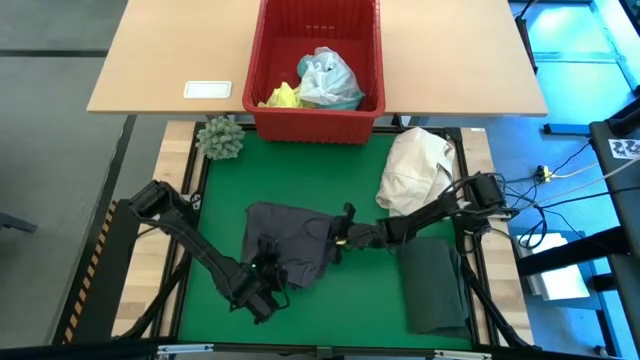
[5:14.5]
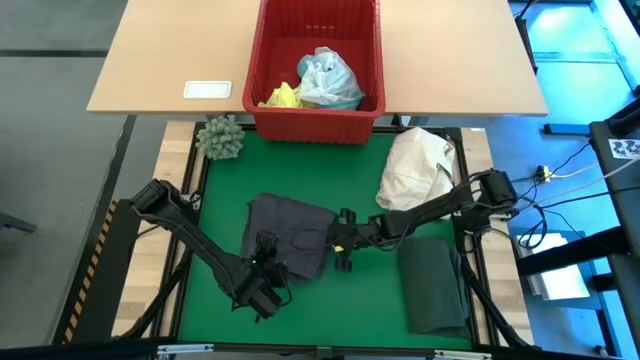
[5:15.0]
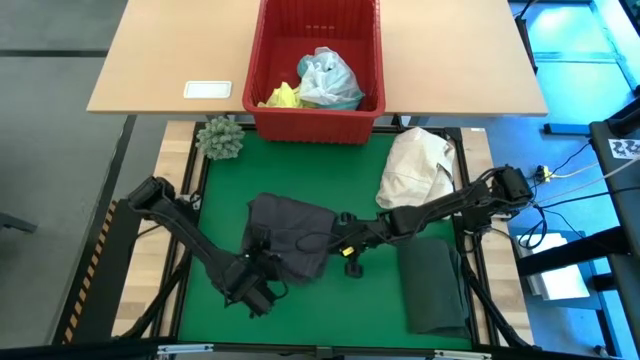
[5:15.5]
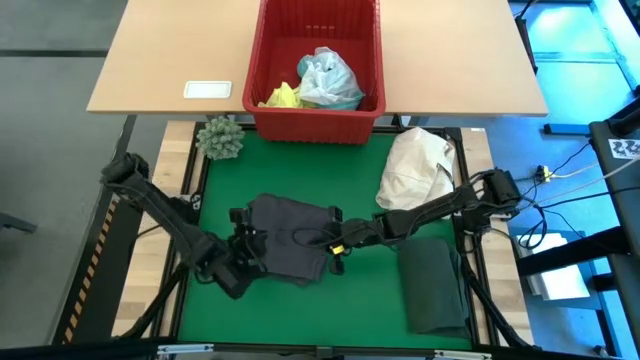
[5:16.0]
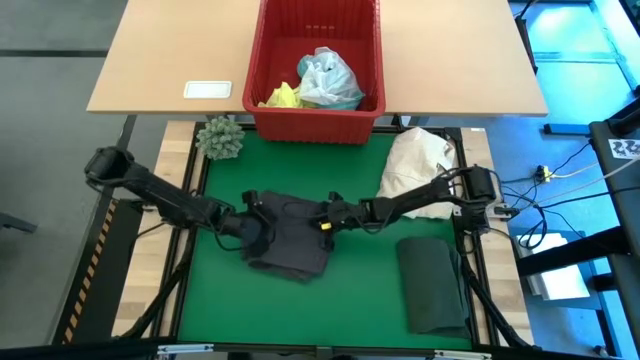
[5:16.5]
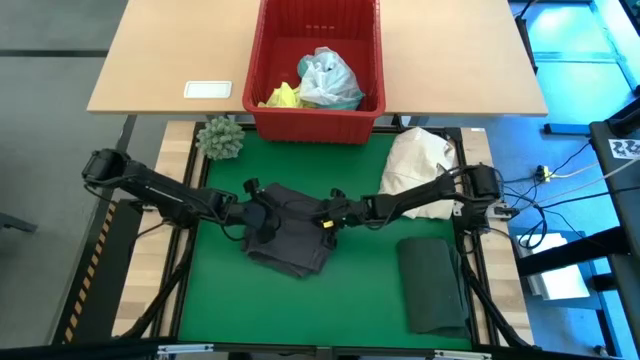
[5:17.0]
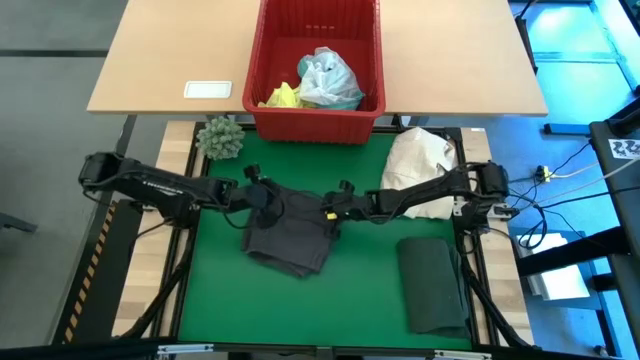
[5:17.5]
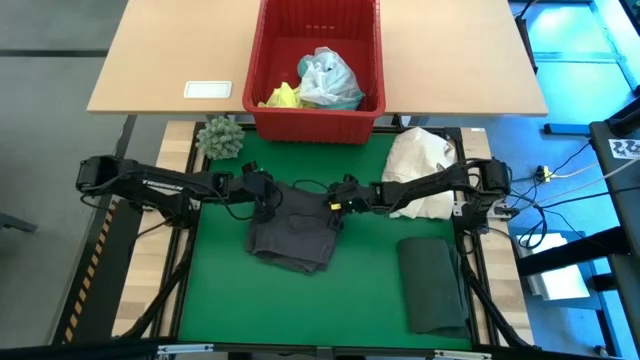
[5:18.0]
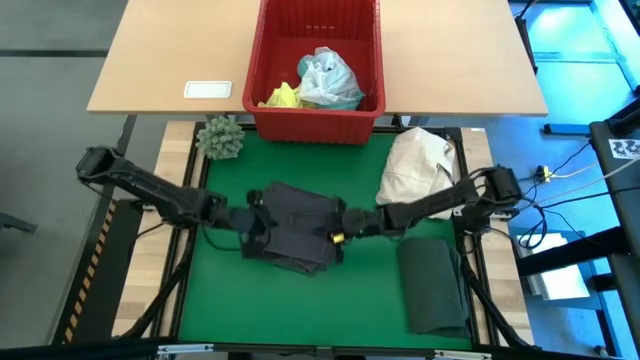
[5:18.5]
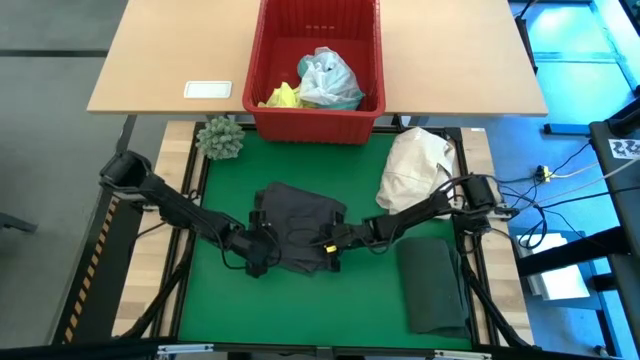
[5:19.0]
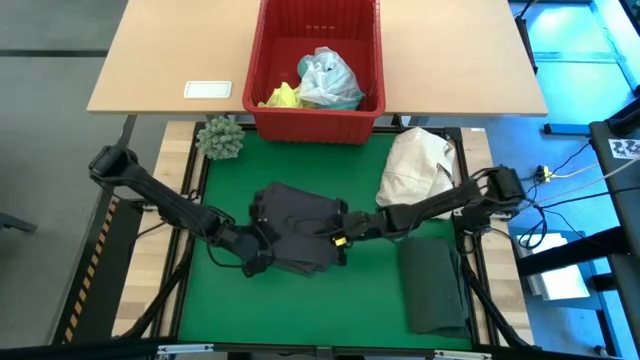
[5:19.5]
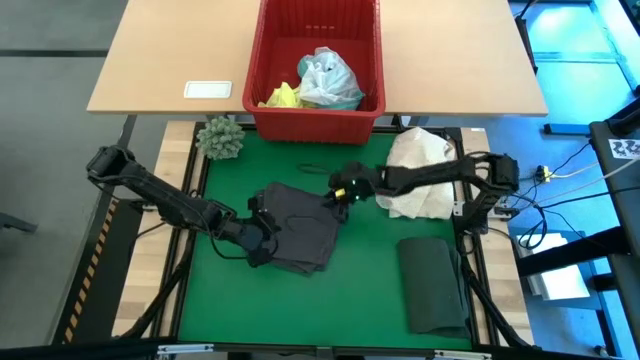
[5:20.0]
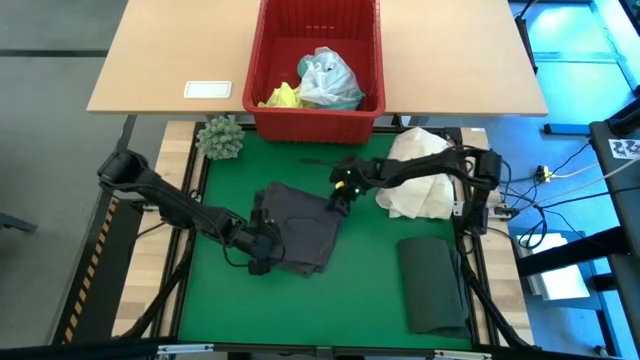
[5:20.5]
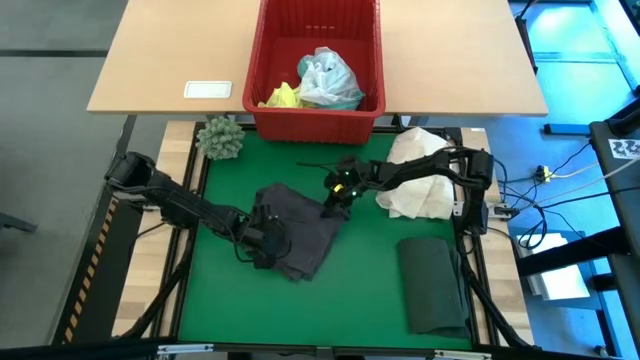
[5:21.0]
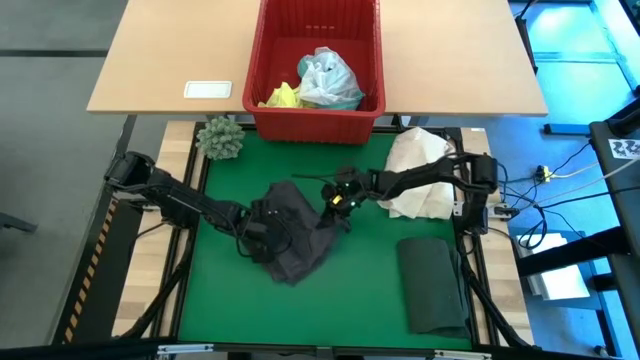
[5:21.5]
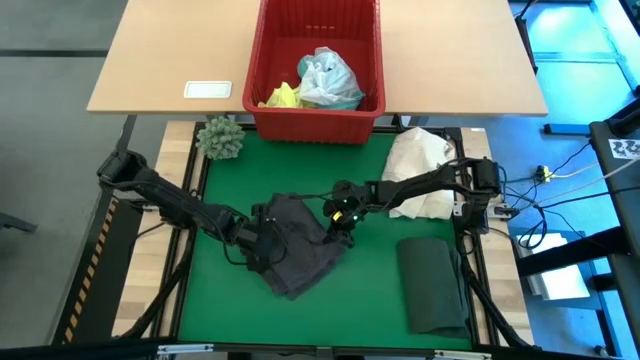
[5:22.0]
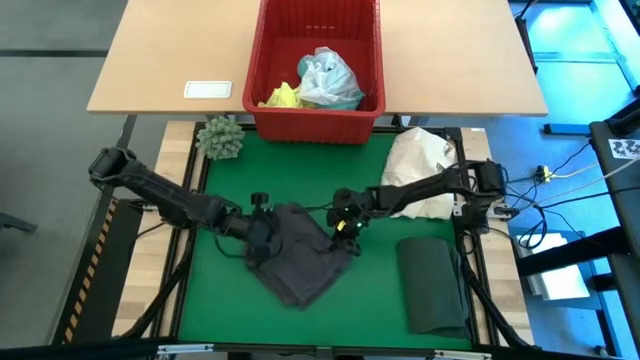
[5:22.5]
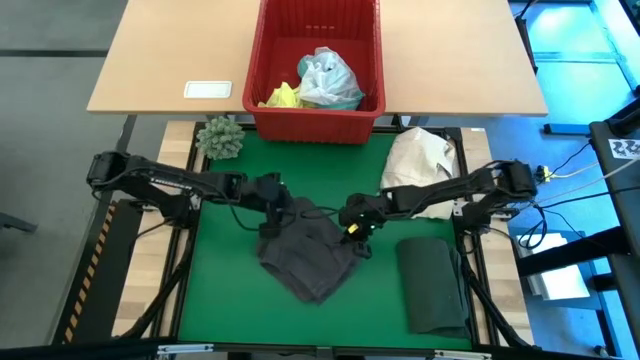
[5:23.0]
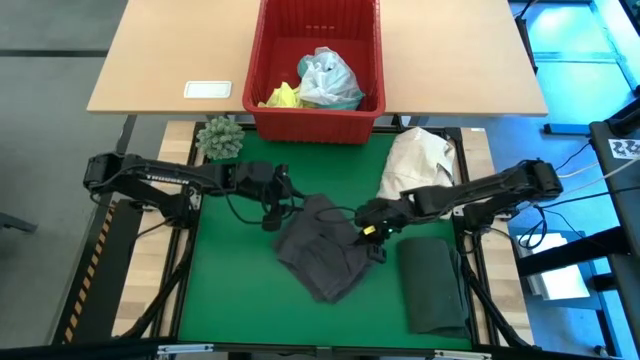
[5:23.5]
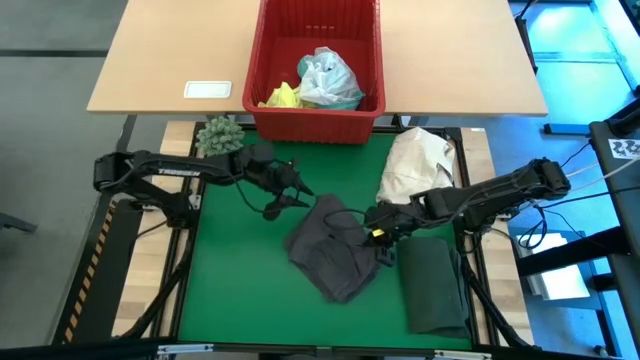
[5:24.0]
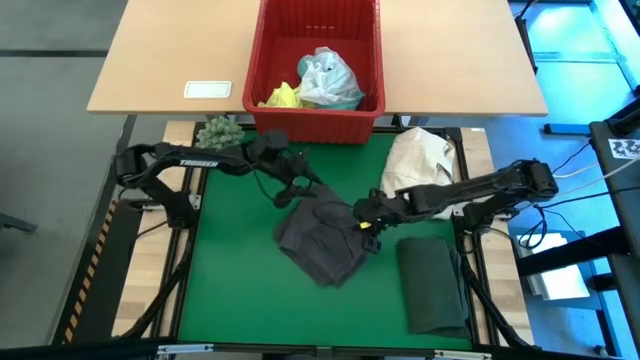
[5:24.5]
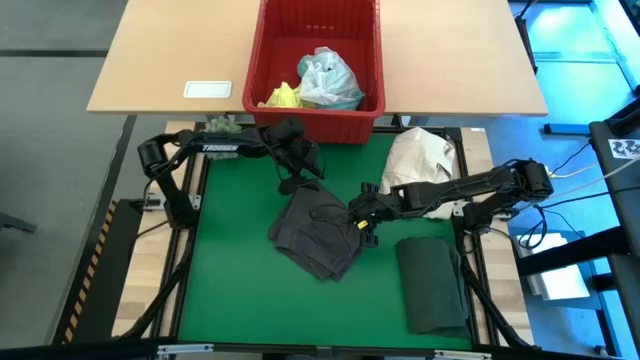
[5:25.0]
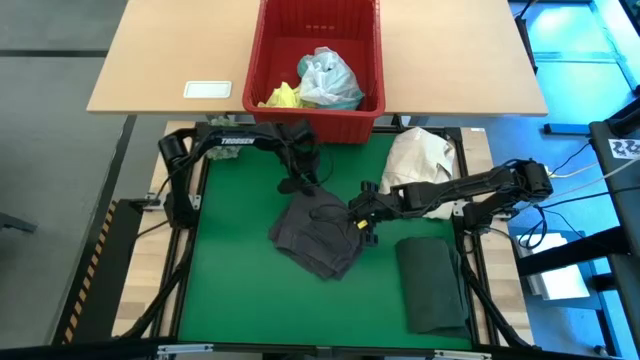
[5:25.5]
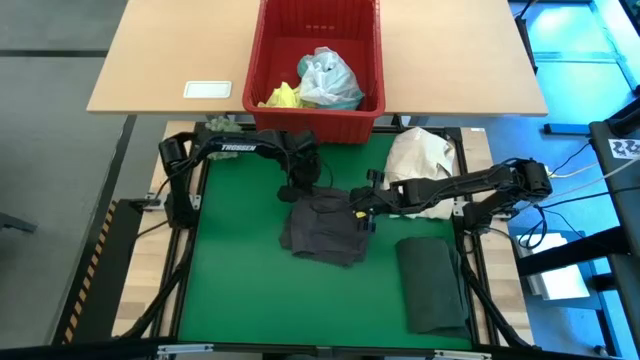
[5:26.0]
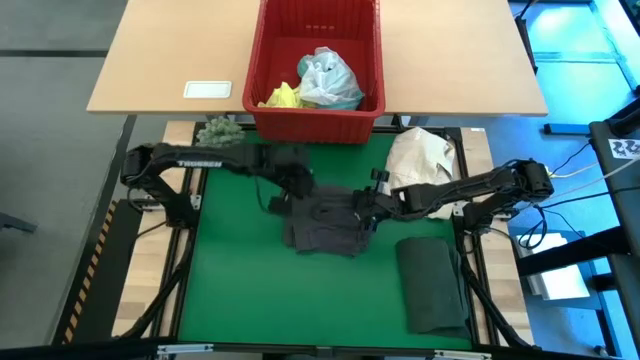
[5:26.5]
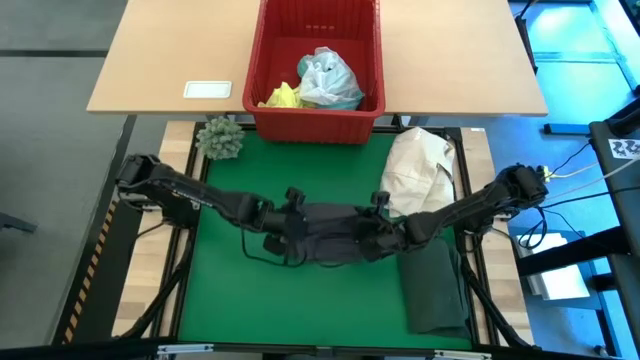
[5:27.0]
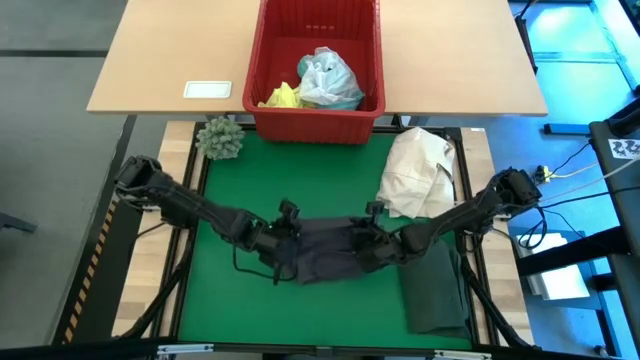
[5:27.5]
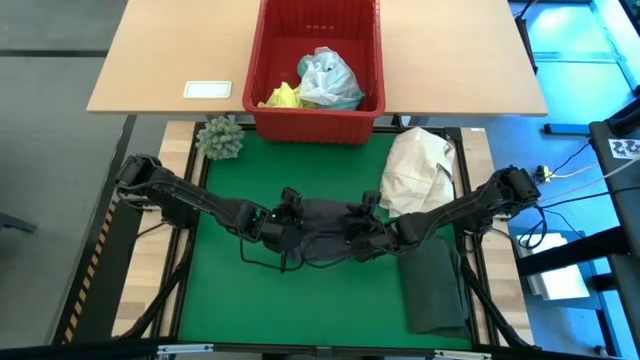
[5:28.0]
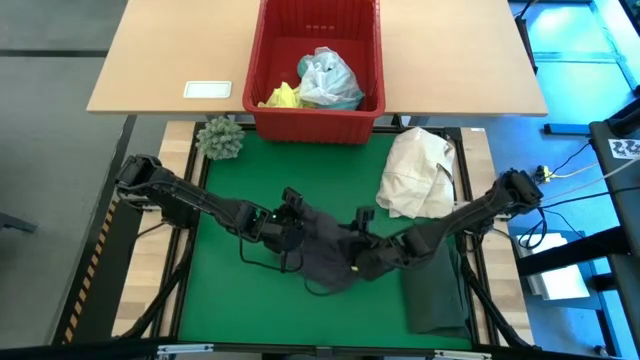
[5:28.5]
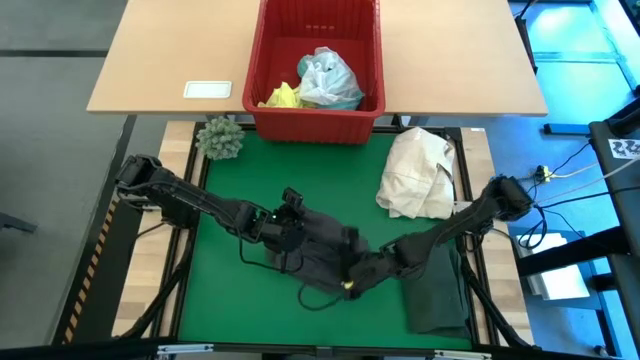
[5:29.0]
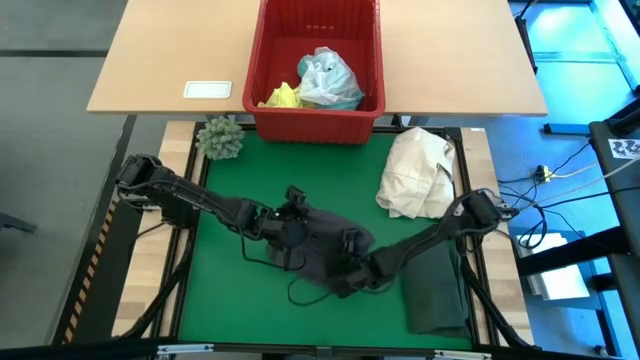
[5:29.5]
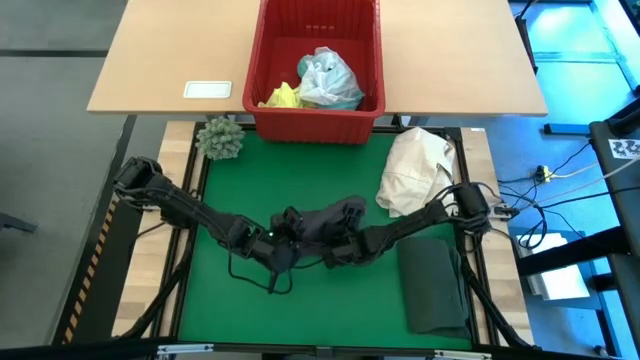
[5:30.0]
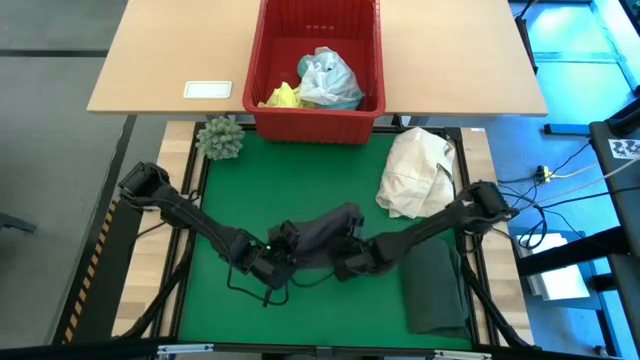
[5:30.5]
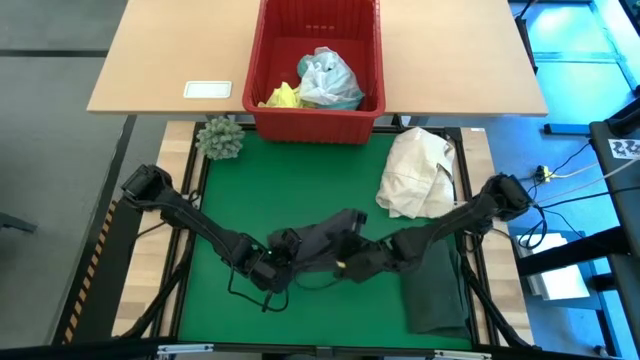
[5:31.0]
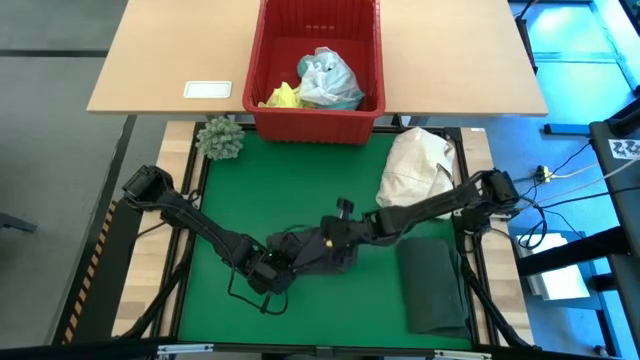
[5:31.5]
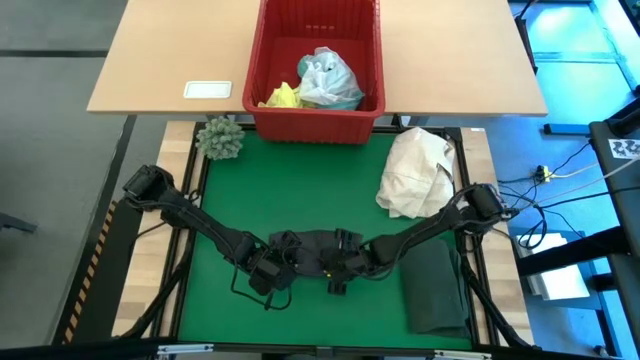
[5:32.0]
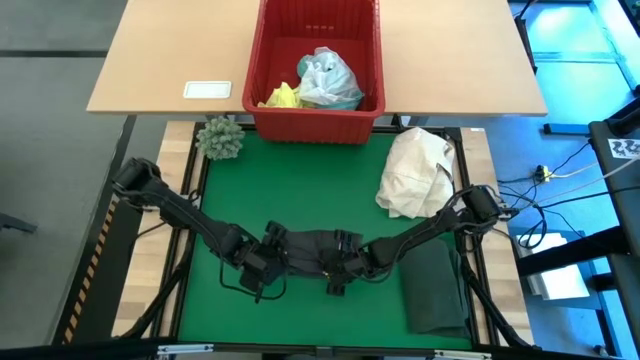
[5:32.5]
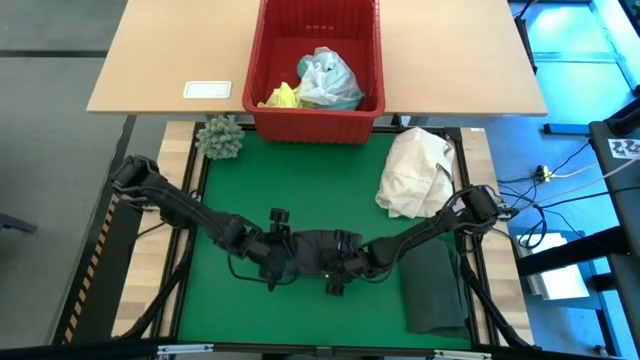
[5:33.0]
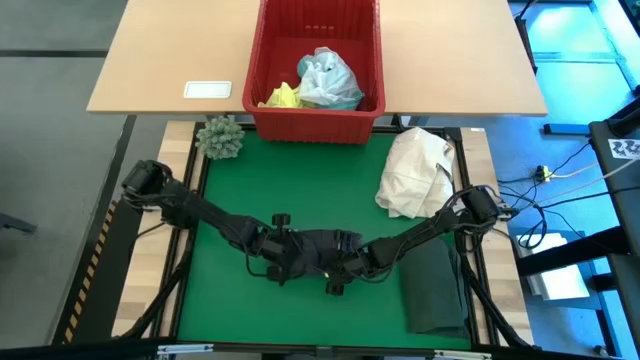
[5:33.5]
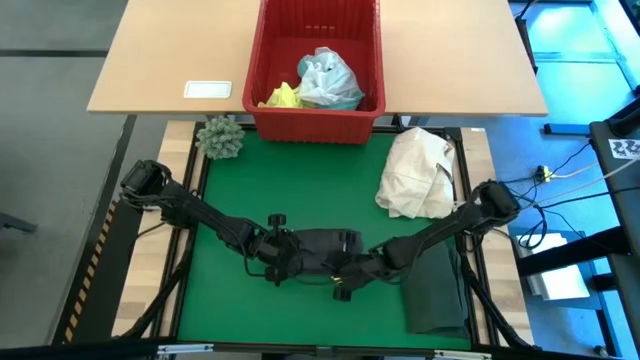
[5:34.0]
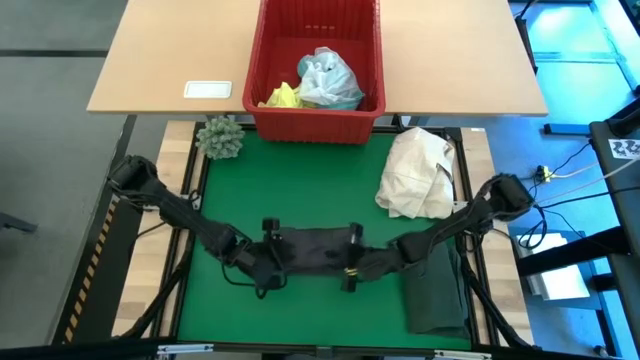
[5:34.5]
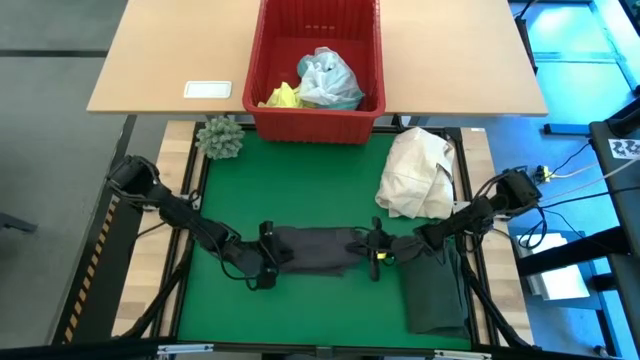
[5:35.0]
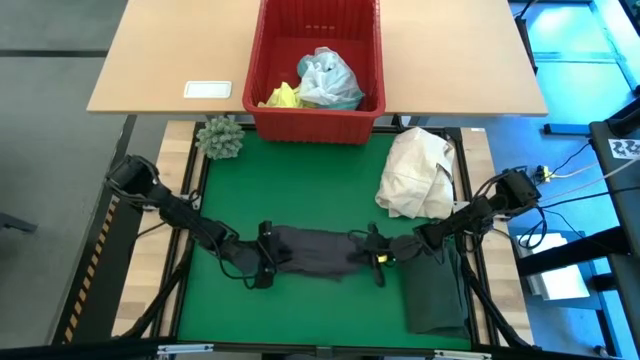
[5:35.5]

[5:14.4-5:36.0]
Task: Fold Laundry from Bin
Fold the gray short
